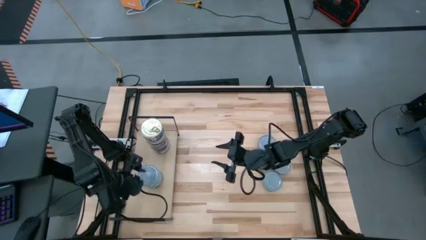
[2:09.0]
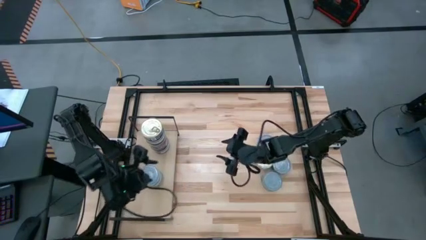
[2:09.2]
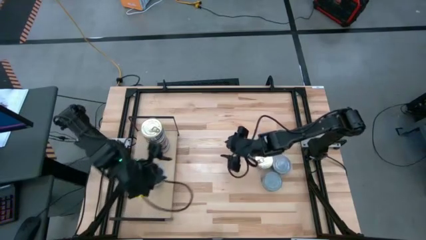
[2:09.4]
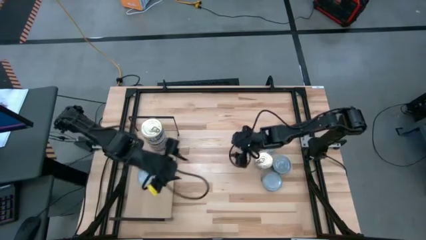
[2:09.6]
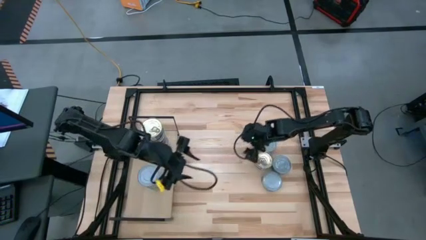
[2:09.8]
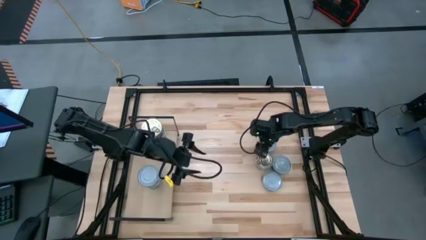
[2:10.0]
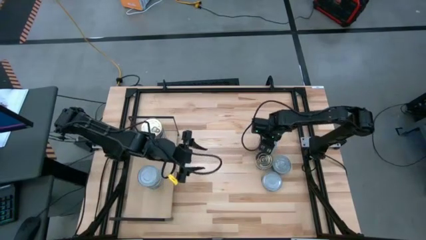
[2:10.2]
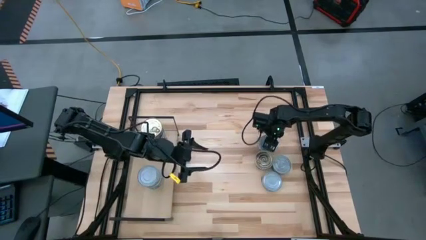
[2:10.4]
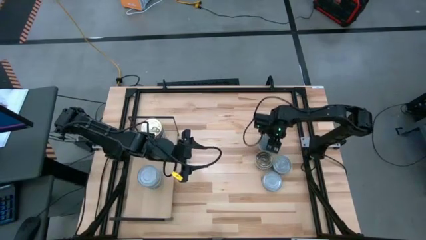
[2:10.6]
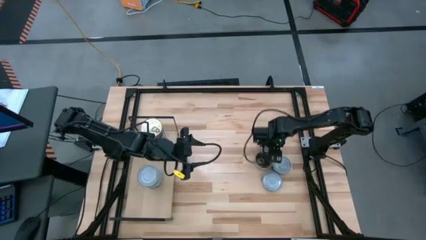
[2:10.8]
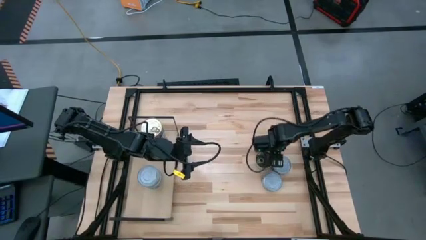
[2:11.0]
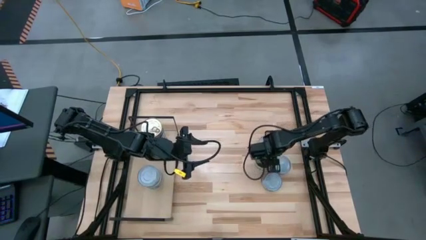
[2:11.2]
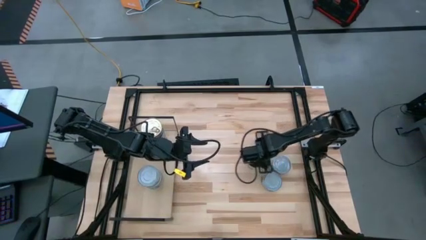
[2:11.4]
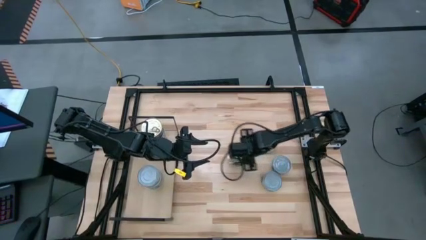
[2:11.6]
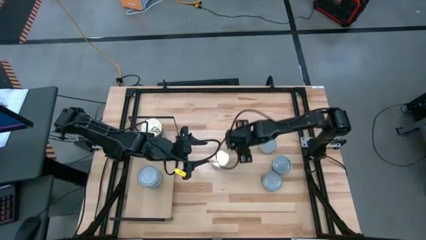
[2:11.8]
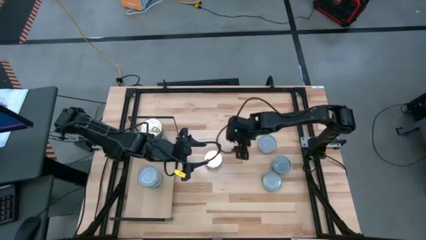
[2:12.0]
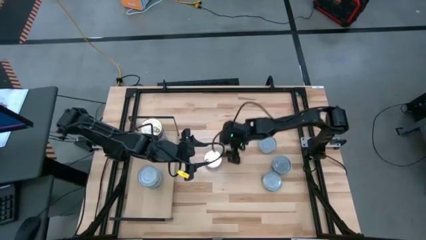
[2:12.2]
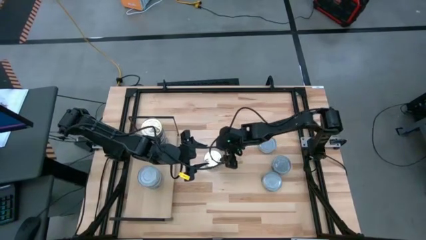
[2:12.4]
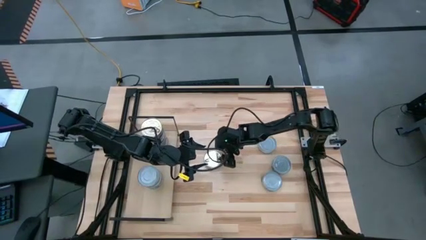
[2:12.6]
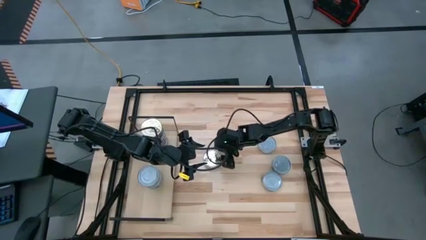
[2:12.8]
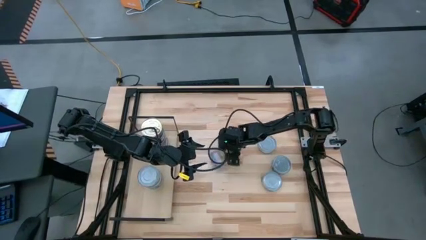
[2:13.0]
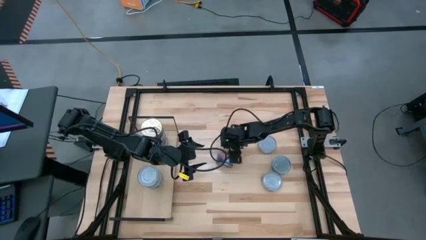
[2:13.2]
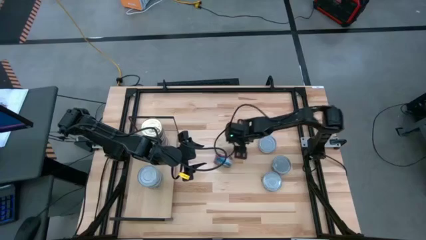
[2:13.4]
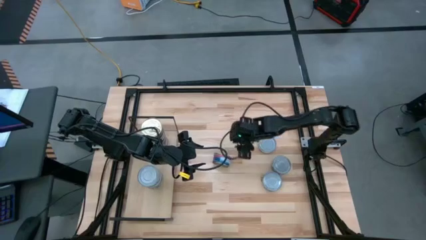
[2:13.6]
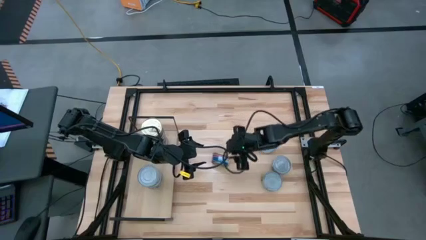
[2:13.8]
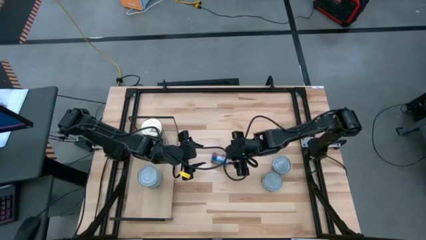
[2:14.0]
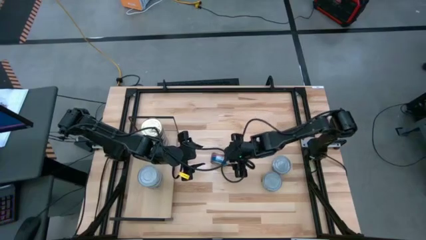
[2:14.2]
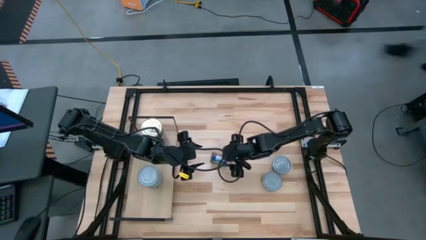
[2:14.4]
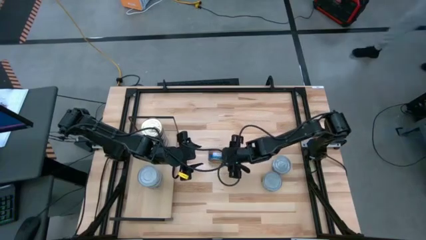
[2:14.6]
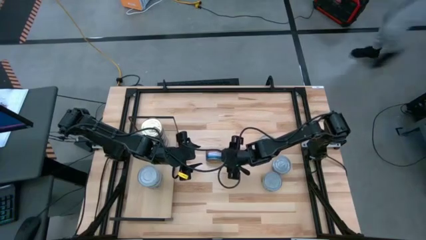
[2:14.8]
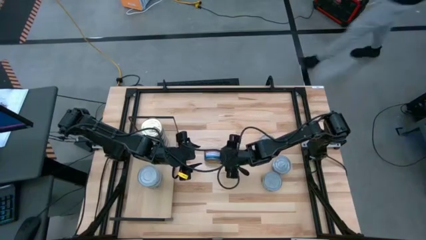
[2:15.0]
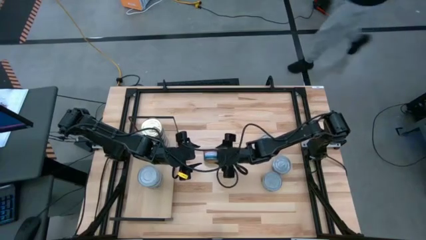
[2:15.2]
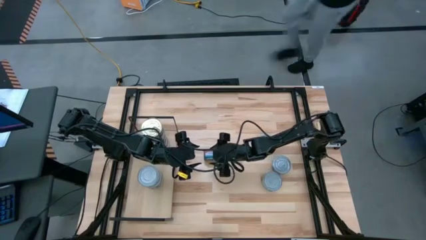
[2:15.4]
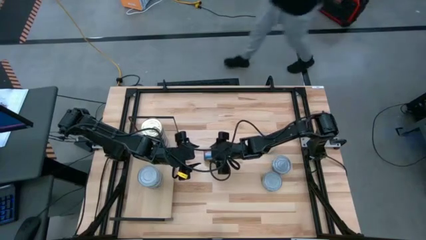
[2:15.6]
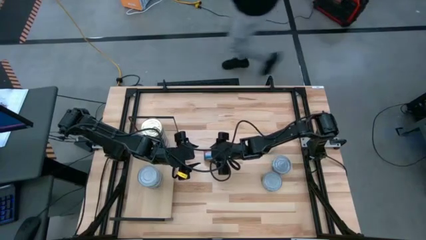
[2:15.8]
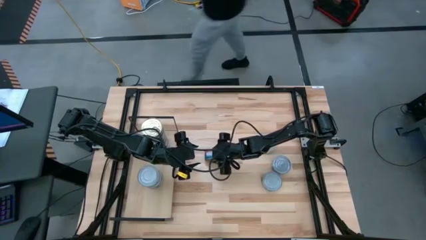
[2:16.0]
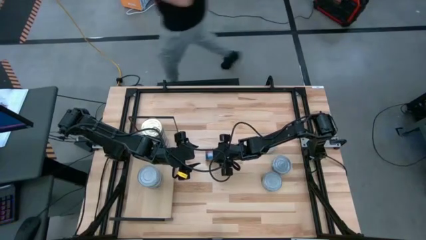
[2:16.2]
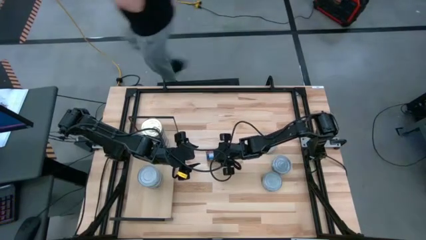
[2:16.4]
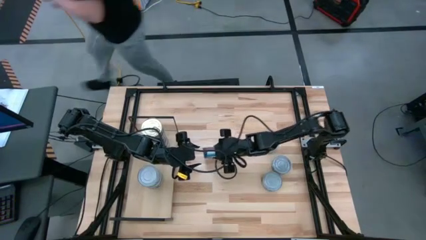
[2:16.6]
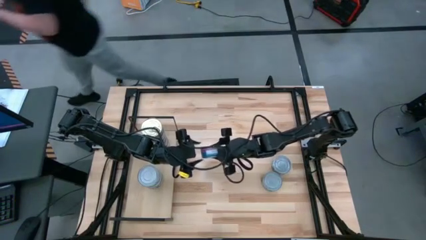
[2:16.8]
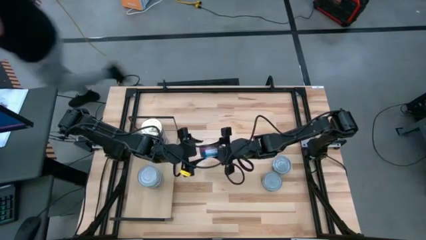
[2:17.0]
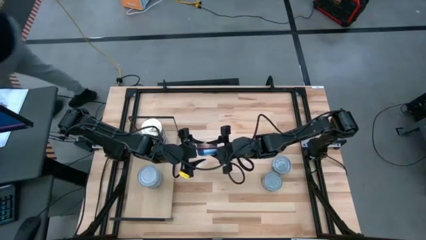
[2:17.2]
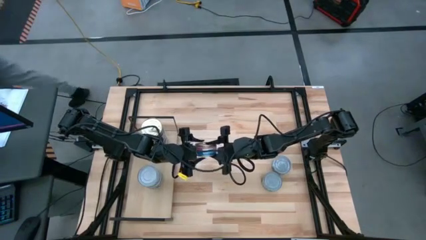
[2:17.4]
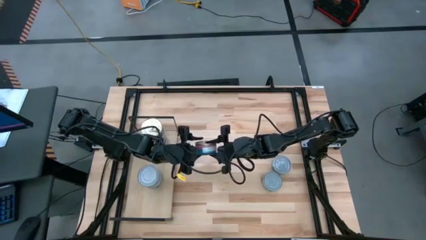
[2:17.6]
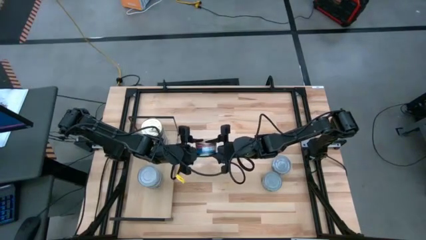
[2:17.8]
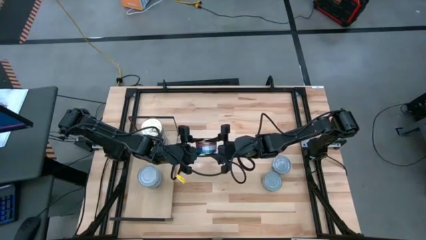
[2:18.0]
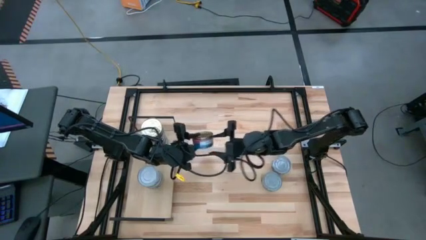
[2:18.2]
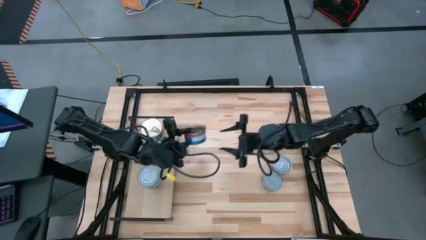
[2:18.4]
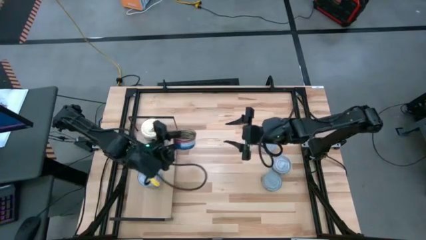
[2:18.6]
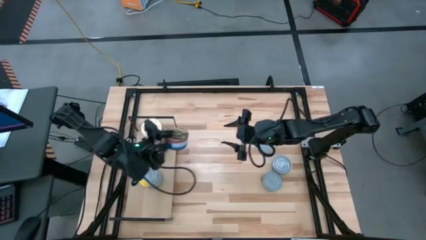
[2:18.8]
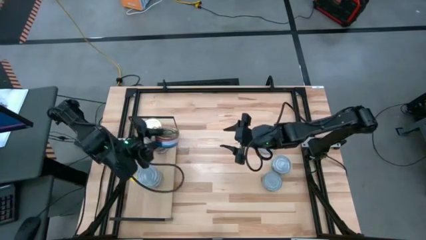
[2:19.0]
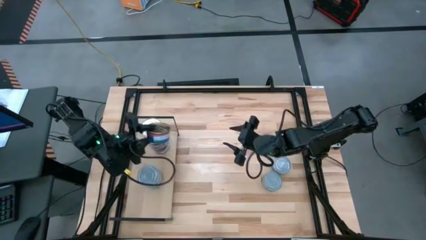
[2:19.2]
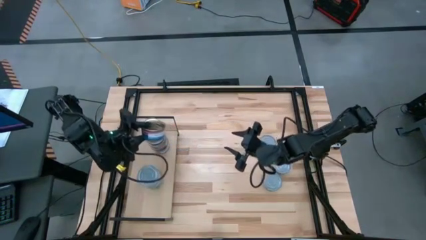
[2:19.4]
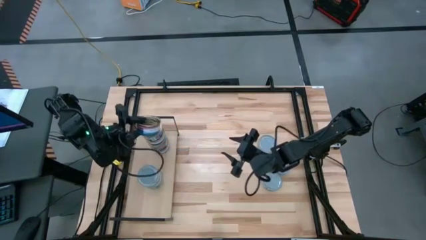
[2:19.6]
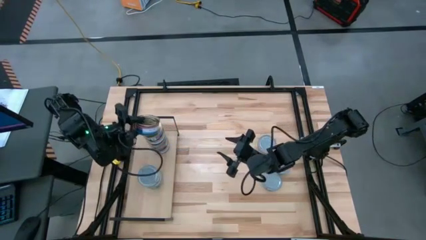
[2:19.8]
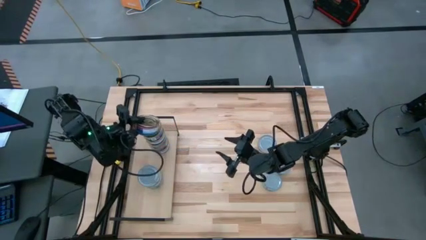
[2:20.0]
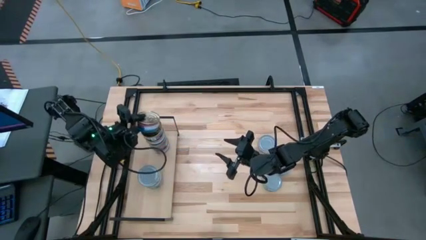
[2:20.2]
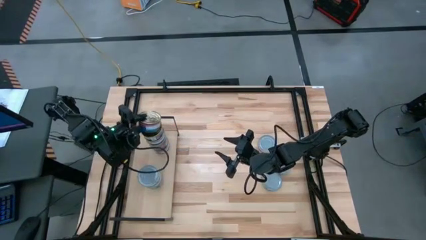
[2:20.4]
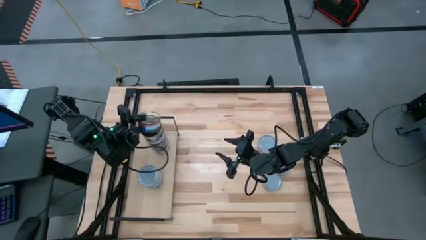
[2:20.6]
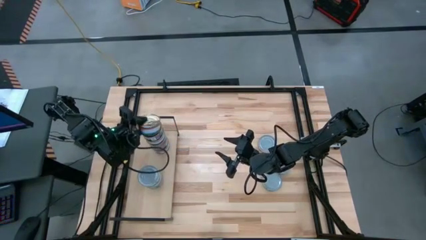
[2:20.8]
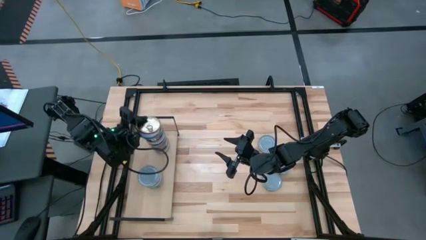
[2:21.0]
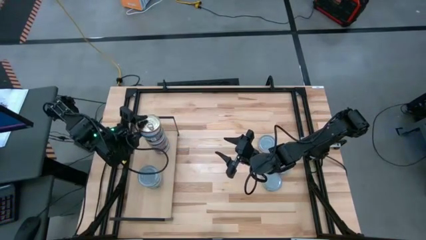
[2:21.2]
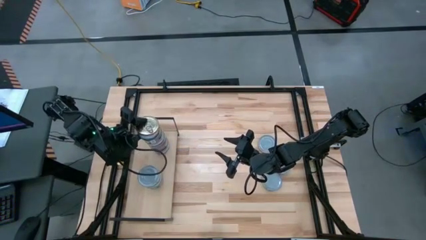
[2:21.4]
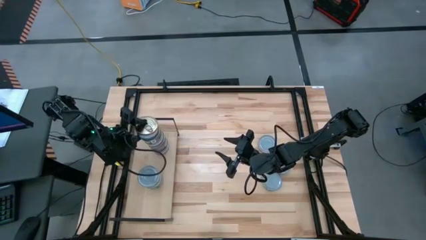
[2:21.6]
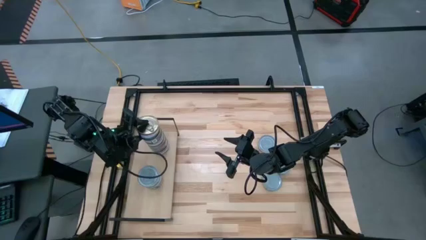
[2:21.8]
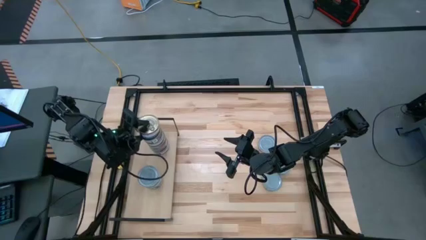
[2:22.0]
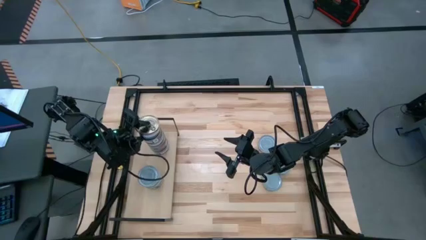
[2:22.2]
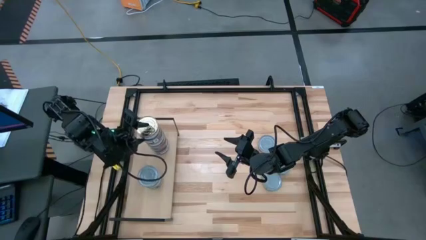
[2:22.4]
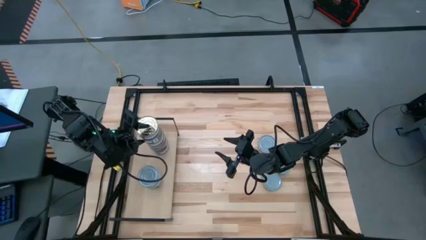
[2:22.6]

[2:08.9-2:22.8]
Task: Stack canned seafood by type on shelf
Stack the blue and pink tuna can on the blue and pink tuna can on the shelf
